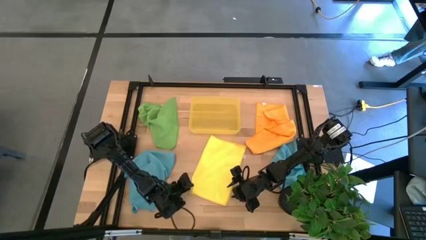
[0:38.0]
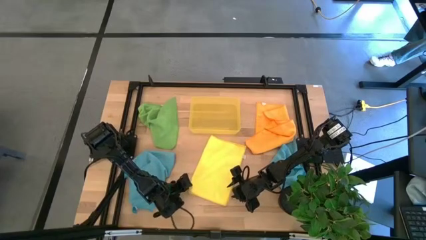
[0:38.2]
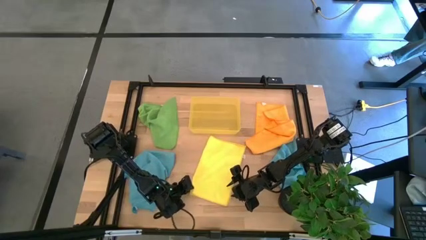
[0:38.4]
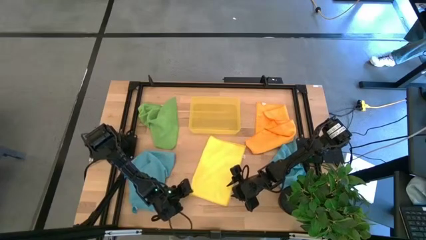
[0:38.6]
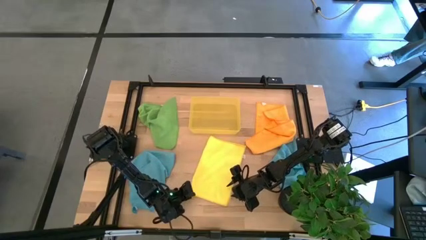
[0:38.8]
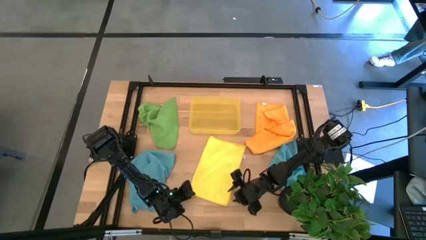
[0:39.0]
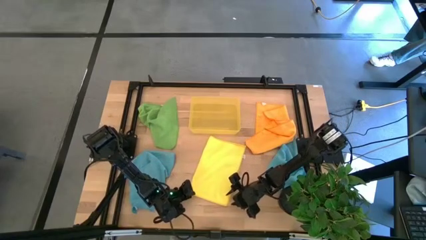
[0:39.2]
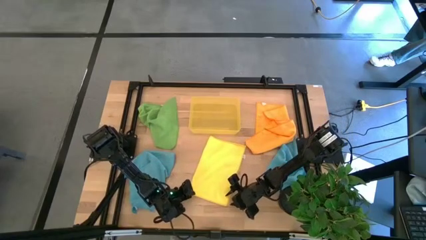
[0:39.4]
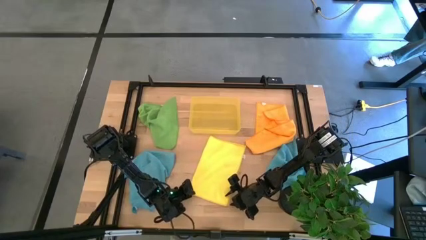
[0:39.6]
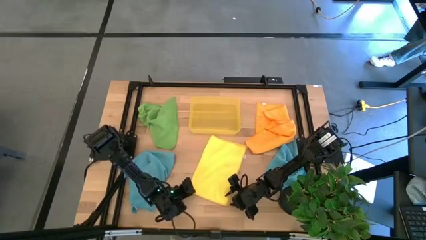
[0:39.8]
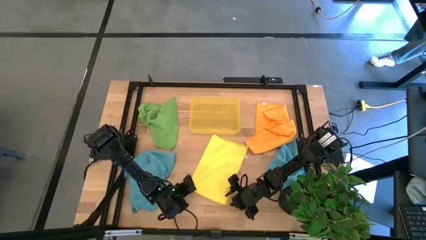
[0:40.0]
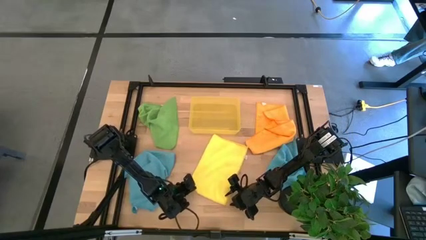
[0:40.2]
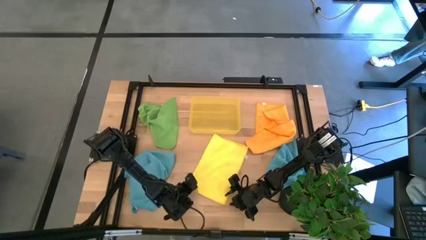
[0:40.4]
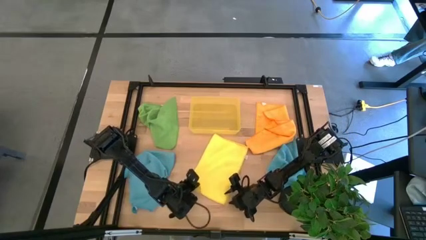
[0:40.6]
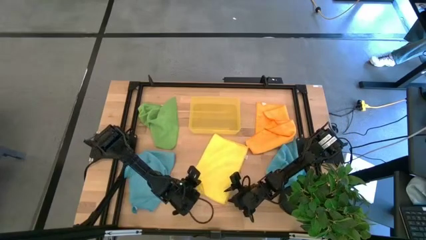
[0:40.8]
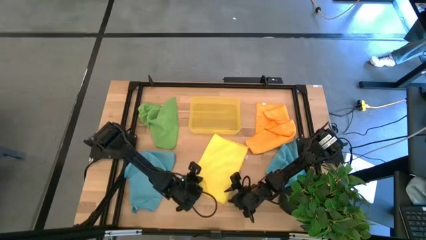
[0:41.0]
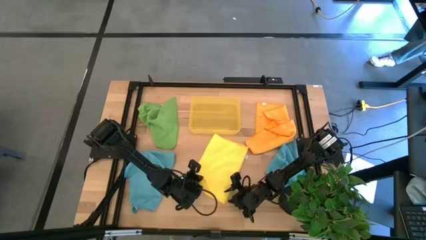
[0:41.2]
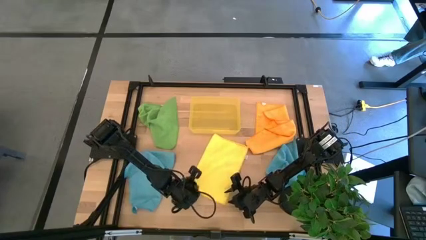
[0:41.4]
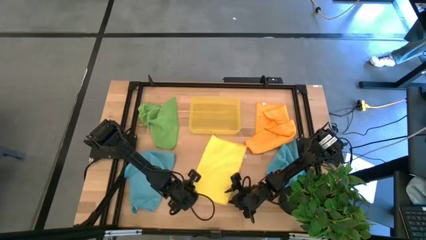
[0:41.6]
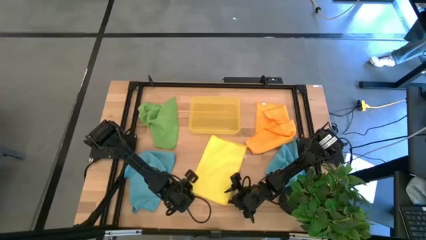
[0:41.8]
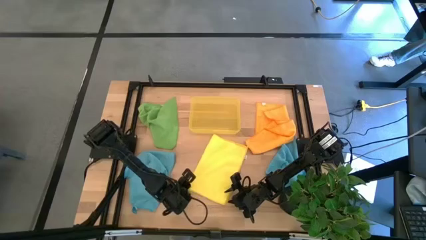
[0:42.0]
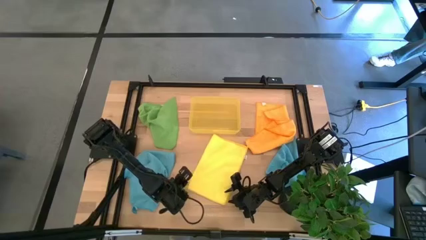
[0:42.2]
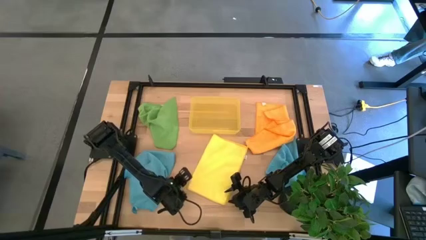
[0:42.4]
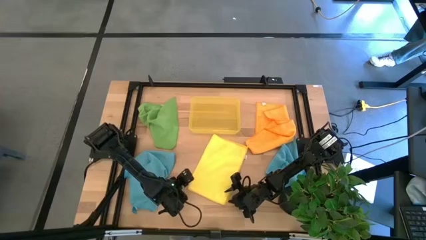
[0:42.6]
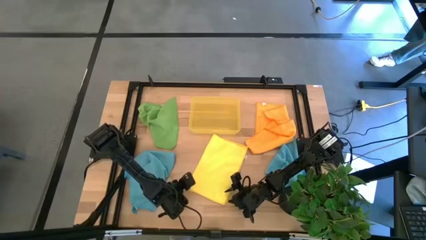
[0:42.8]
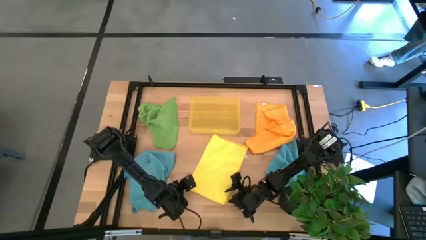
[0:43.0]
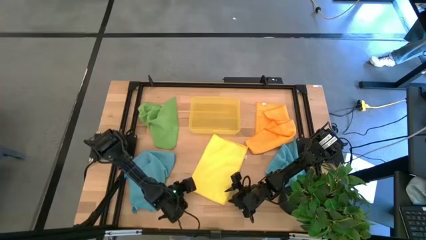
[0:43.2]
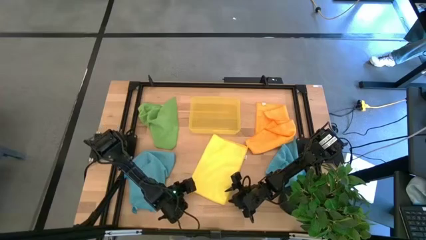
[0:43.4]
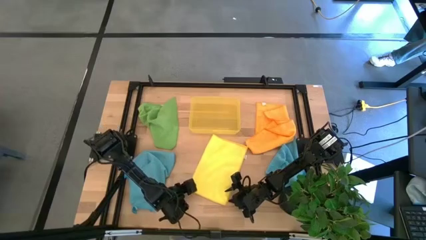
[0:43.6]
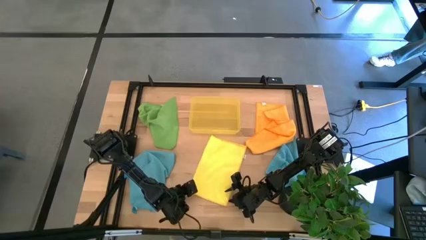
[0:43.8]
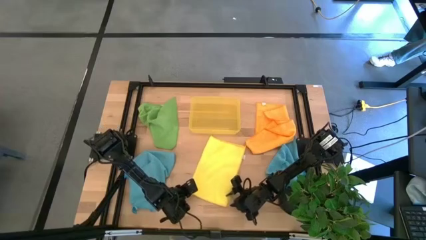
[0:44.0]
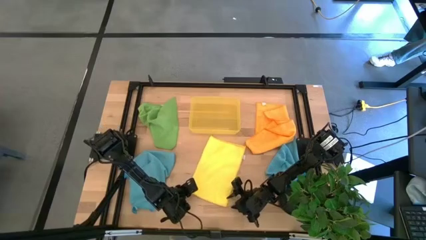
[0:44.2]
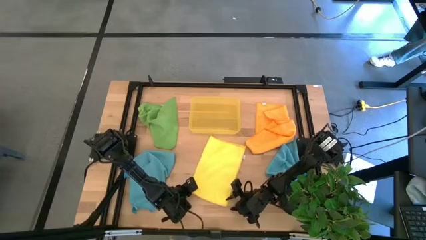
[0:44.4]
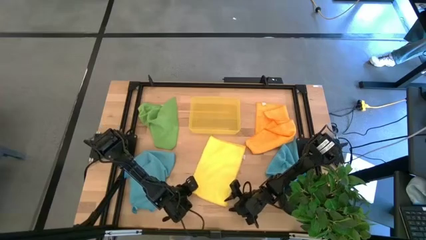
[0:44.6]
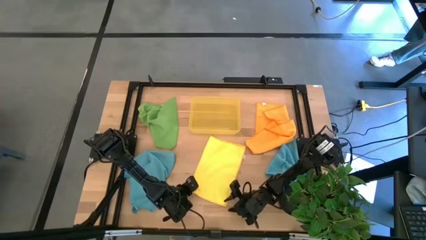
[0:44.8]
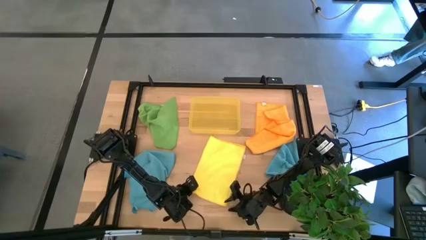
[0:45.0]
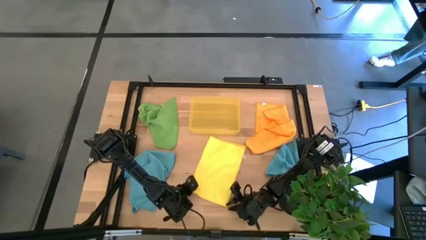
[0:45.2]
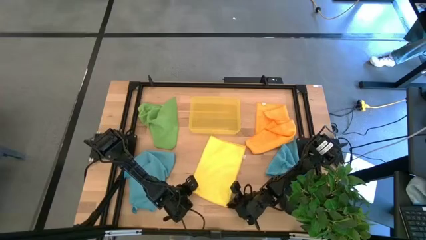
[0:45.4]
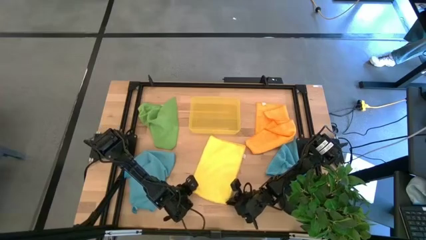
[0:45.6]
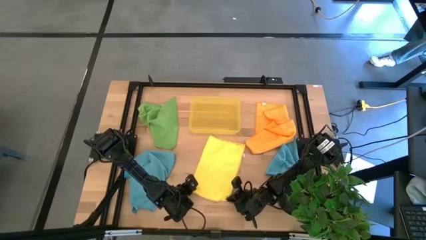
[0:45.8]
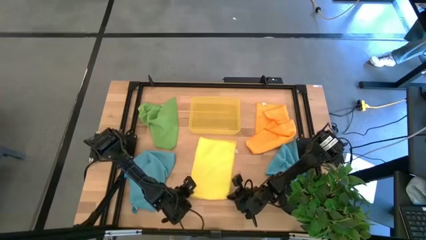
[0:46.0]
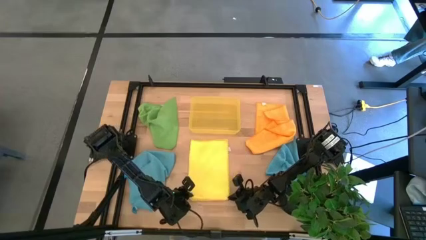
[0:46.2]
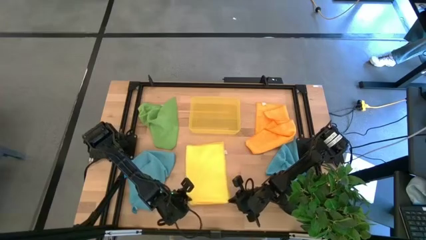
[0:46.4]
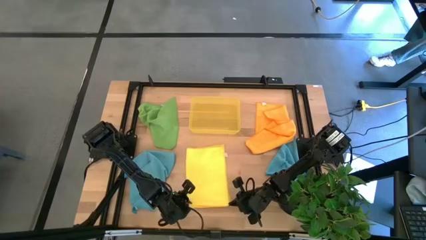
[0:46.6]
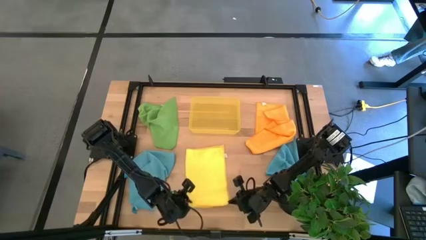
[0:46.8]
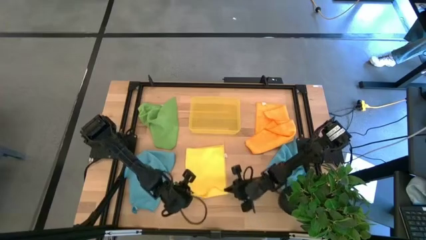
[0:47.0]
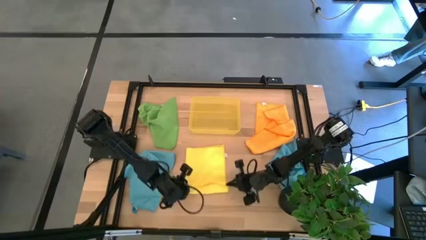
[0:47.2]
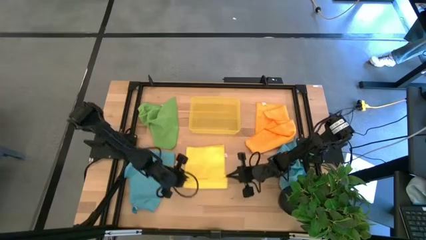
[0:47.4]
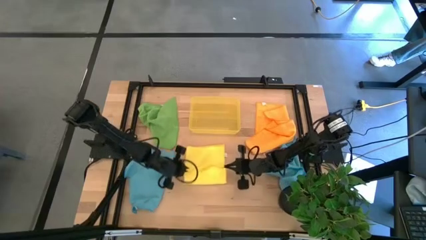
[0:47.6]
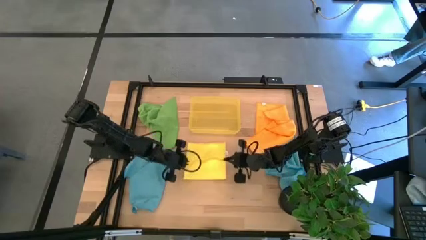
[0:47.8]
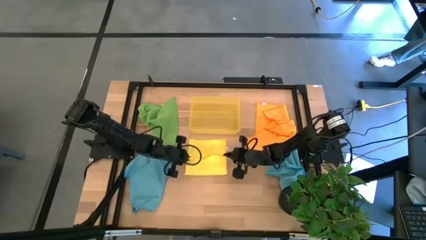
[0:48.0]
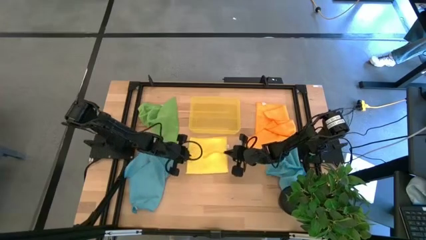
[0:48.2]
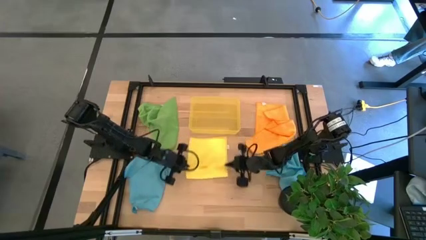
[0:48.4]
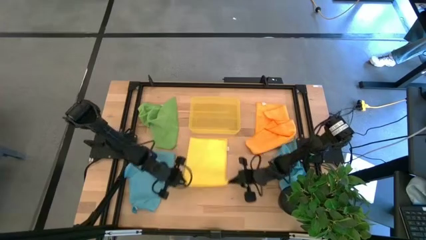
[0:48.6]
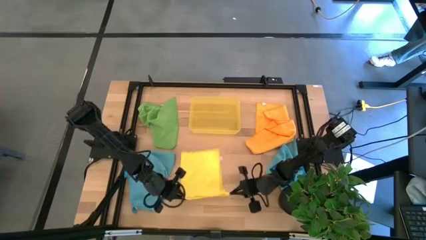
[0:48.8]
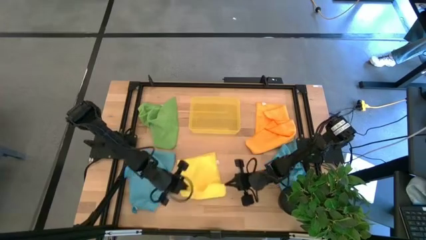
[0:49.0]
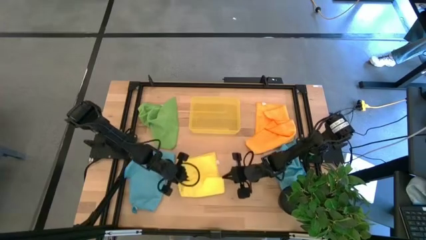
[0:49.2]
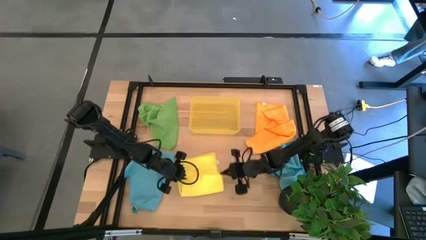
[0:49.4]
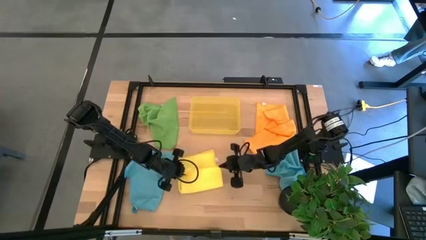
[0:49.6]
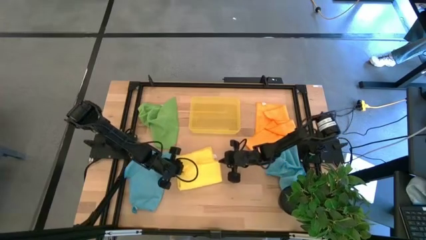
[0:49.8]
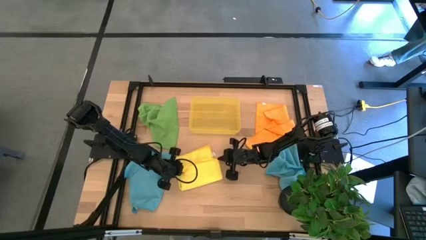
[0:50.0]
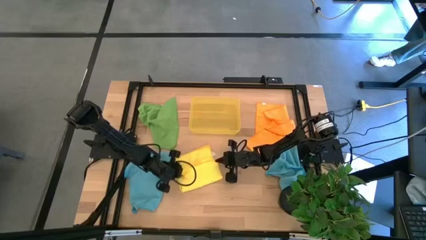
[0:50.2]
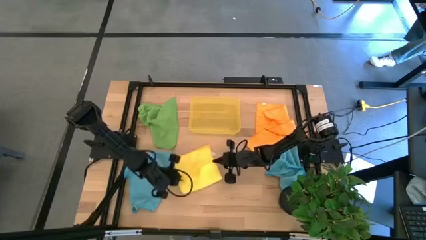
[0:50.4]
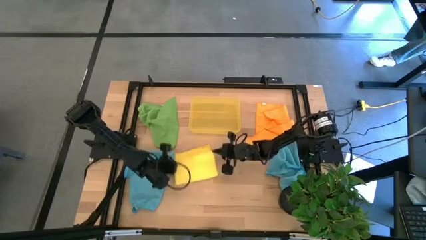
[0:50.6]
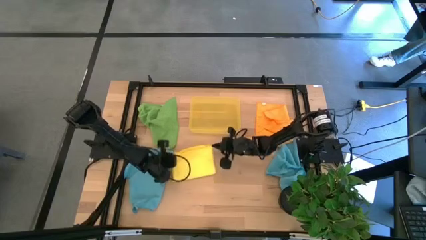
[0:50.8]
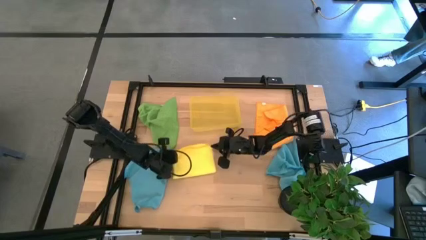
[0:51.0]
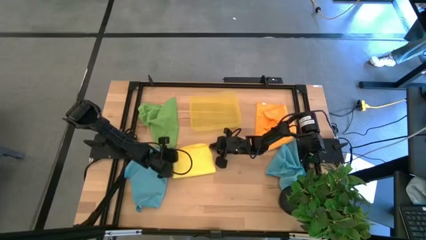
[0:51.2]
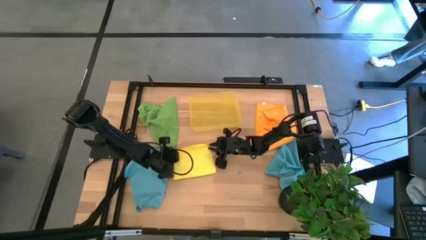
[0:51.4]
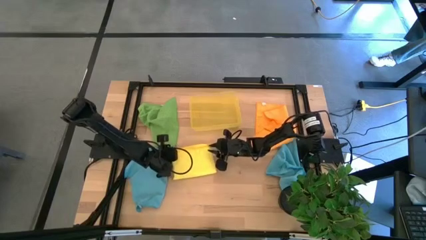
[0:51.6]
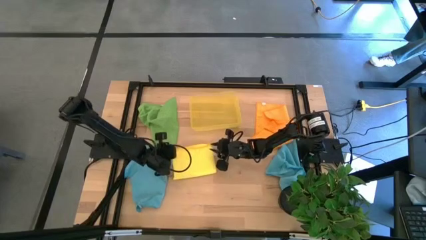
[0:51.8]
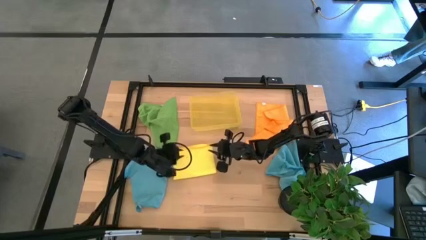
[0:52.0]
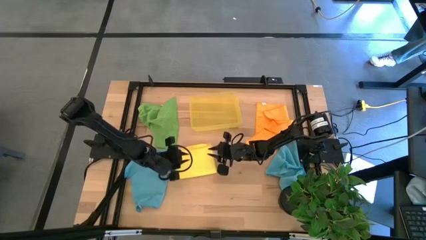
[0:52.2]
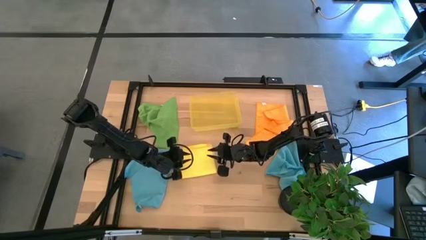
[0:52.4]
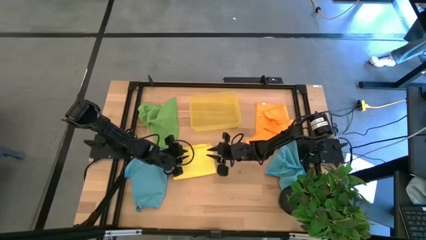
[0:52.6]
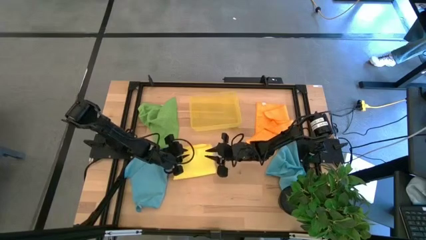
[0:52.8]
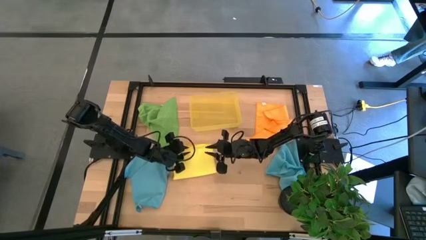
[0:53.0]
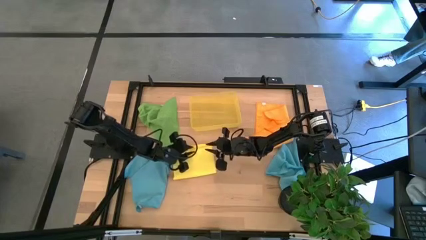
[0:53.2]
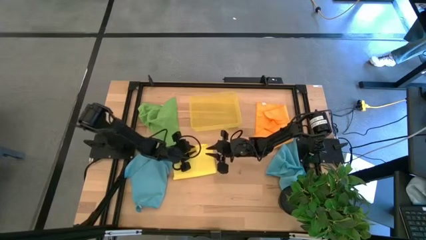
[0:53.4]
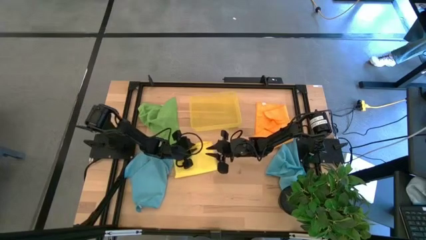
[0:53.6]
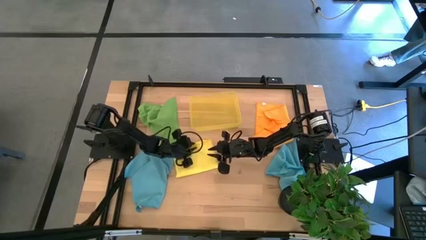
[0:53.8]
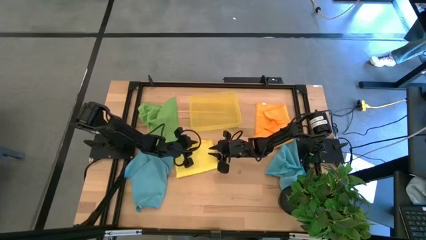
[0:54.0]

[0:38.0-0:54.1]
Task: Fold microfiber towels
Fold the yellow towel
